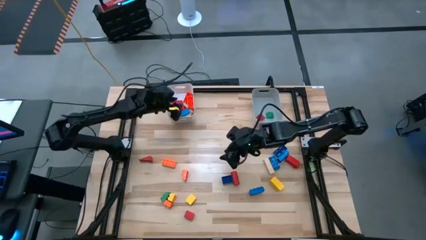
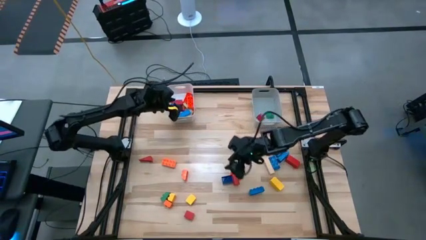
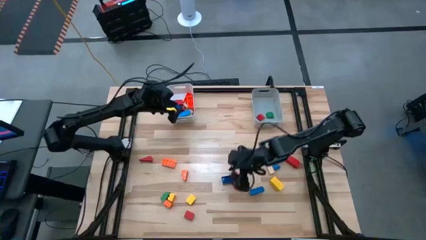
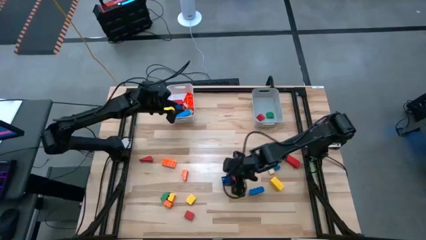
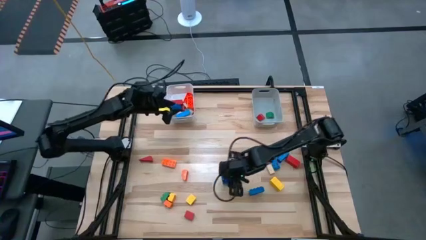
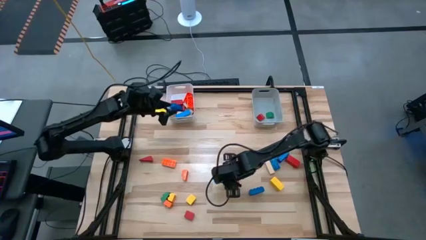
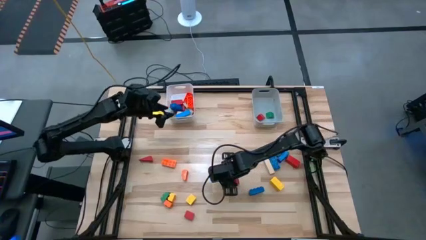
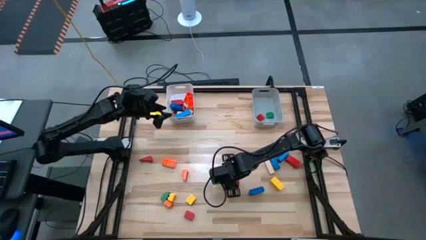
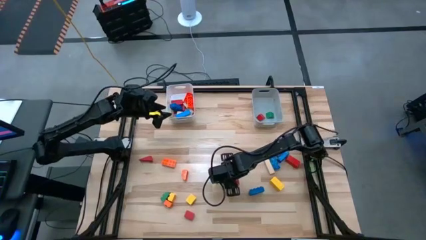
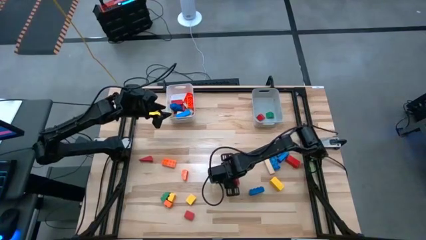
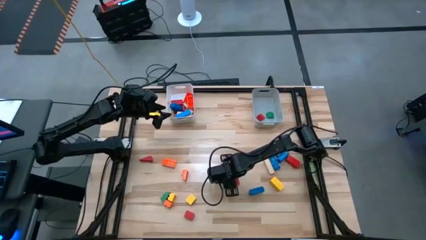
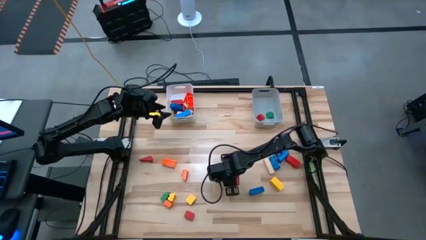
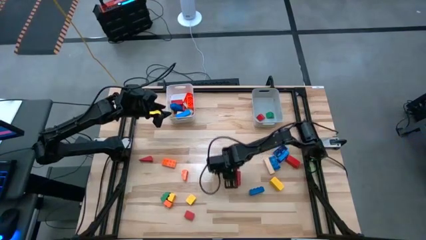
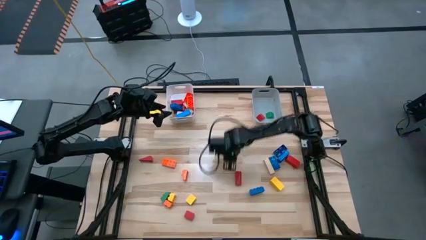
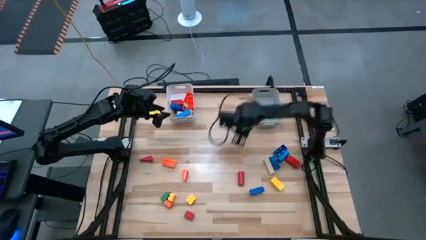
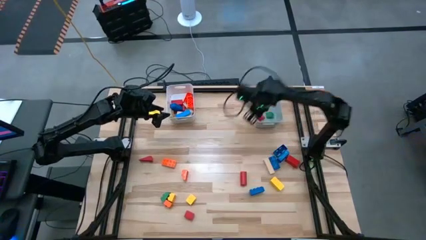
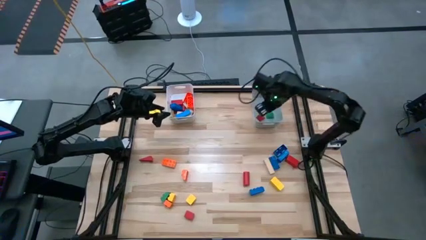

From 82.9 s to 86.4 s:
Task: Sort blocks by size
Put the blue cuboid wooden block into the gray bin

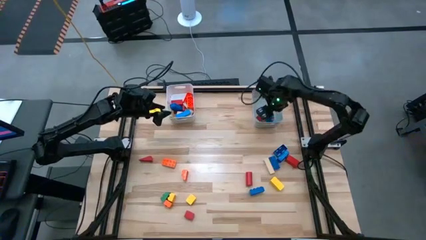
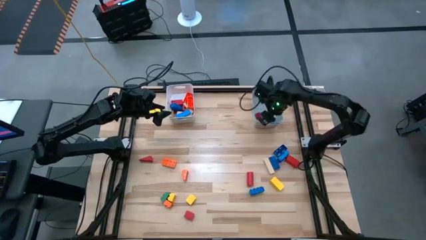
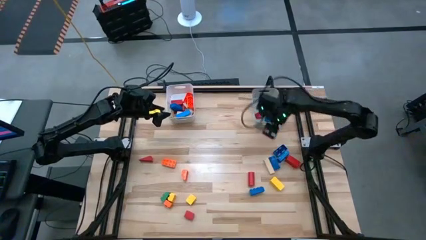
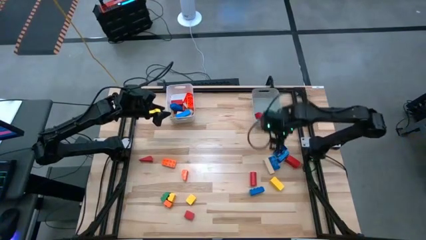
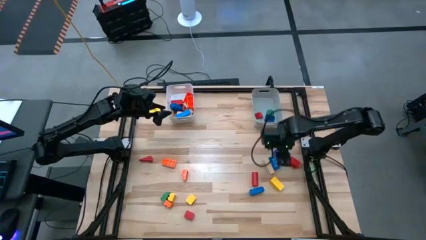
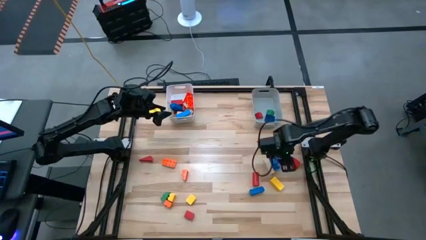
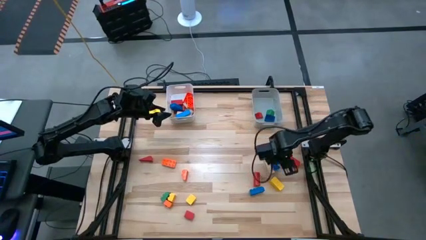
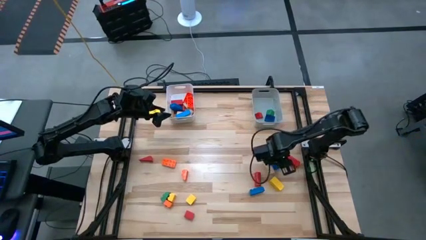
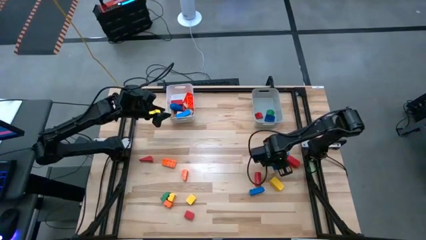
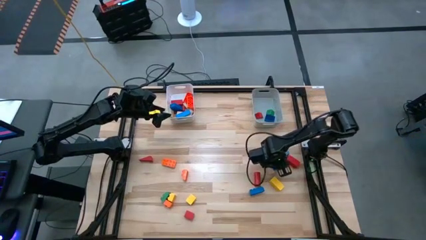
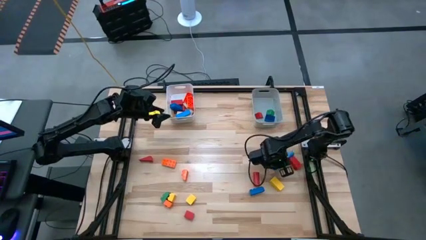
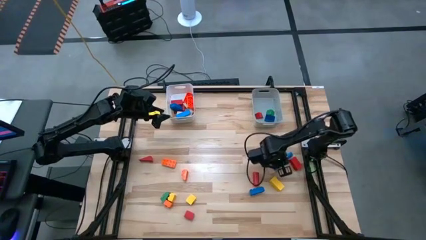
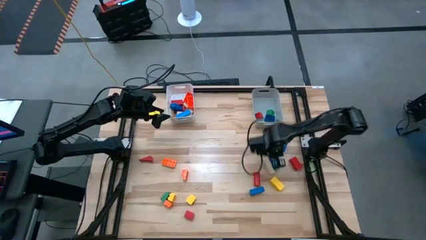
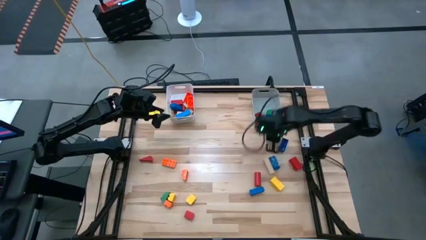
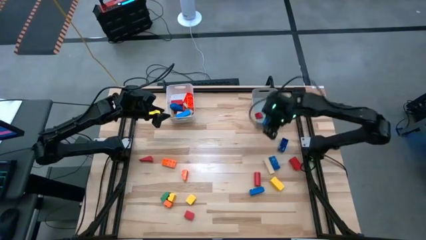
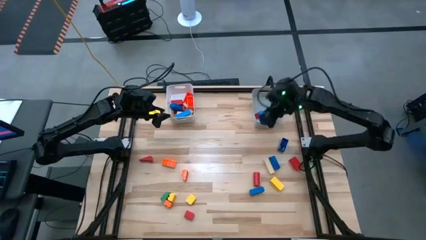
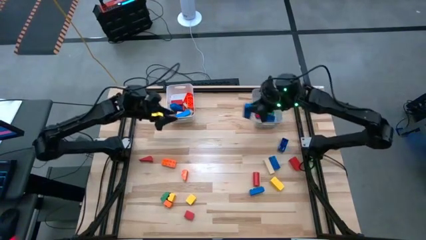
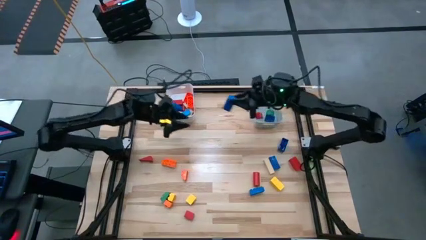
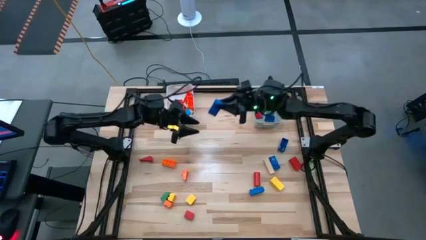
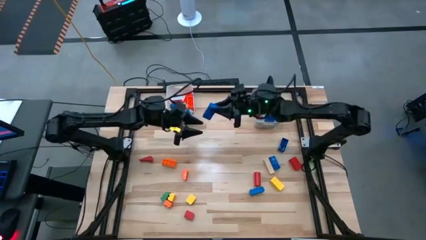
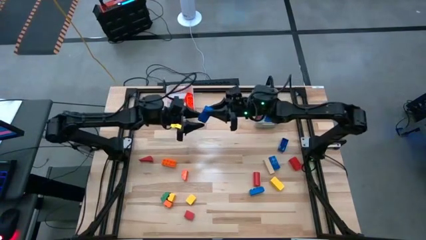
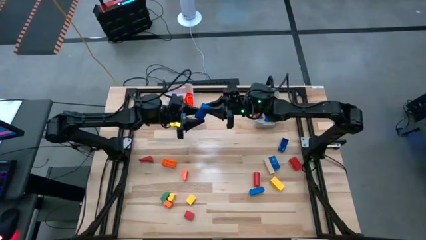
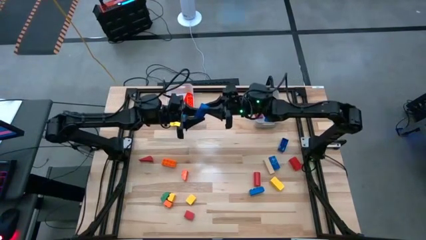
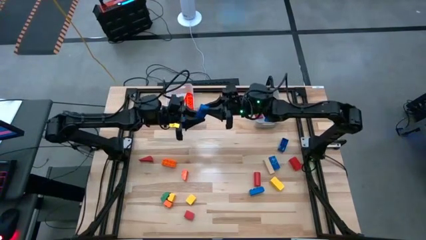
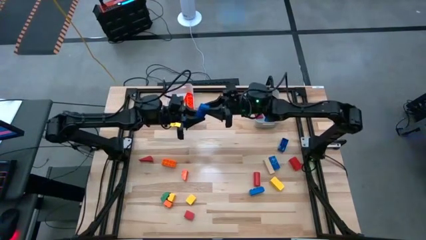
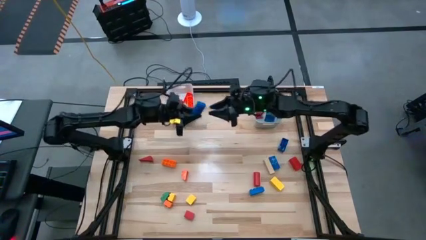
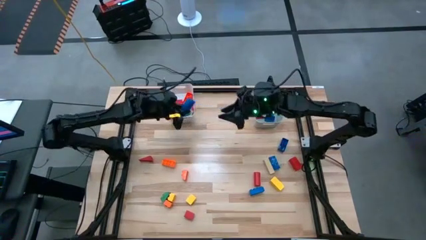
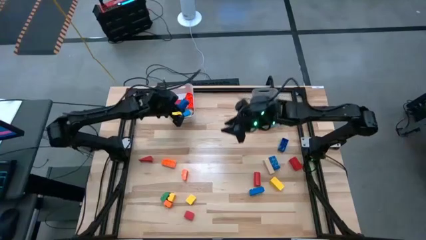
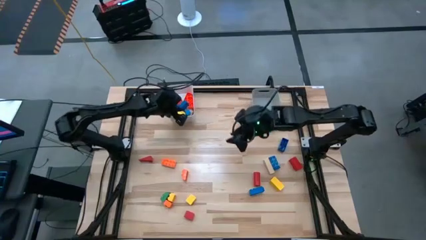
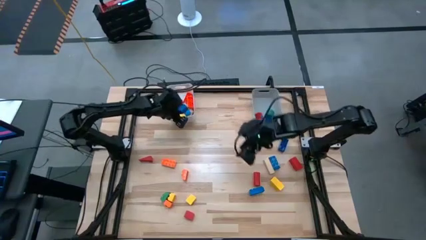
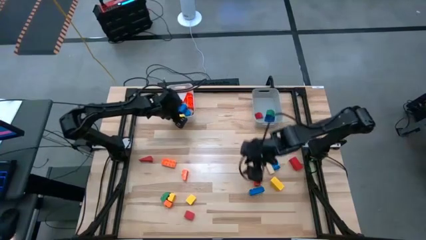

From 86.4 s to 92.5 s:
Put the blue rectangle game piece into the white bin

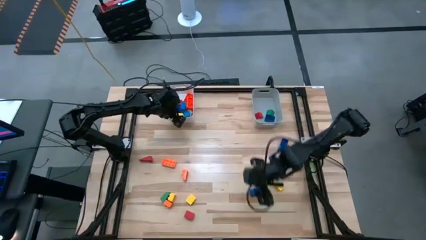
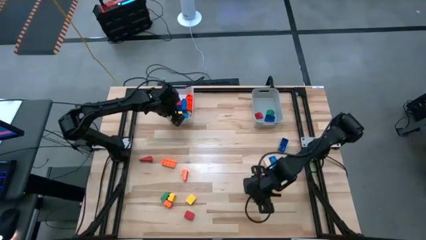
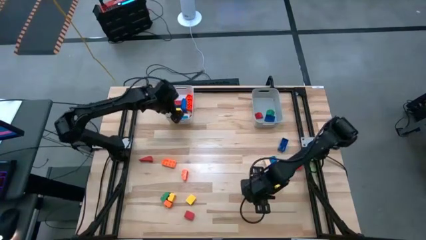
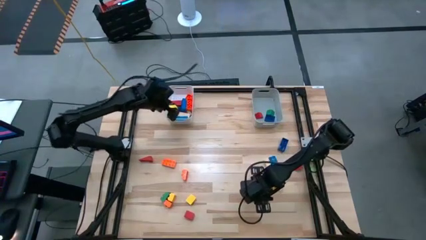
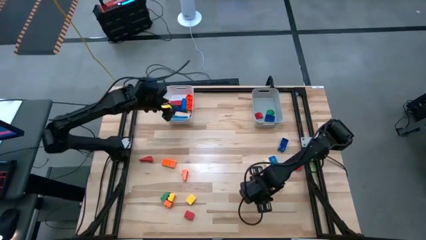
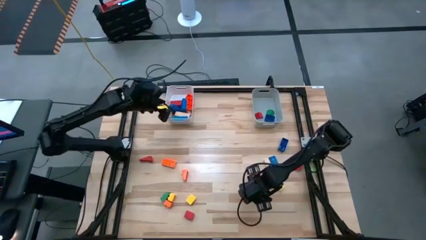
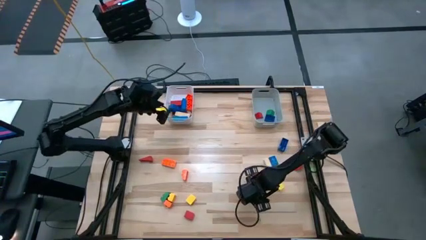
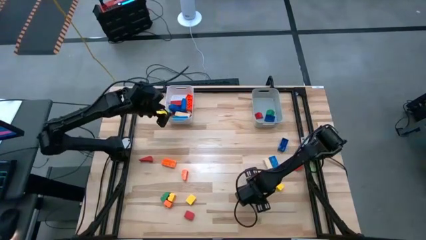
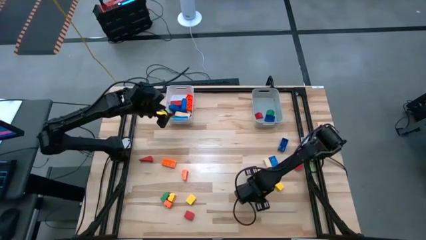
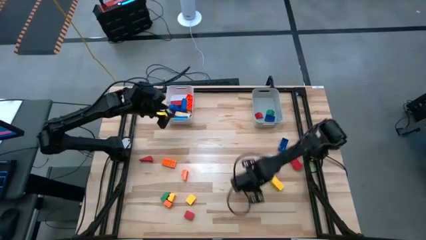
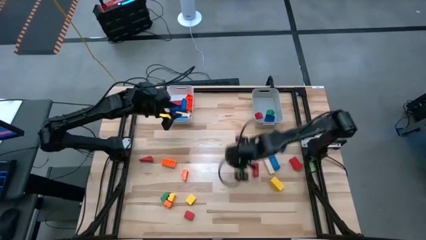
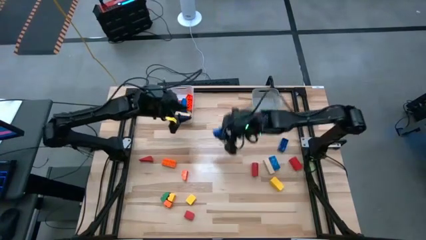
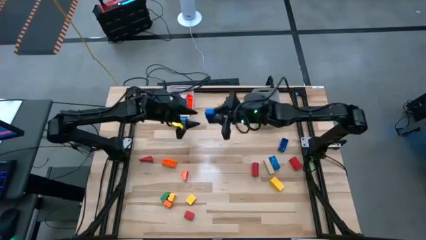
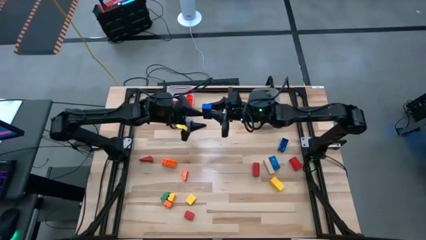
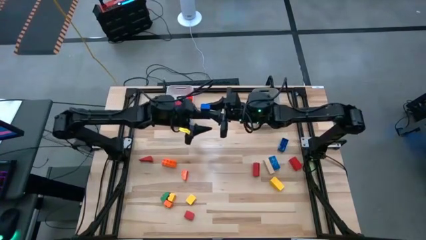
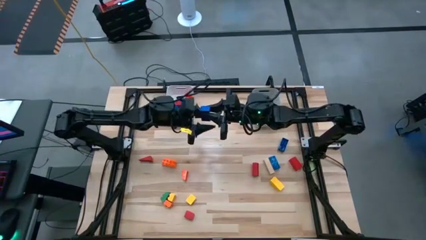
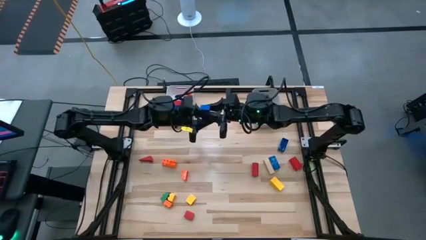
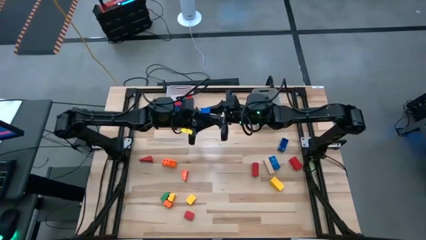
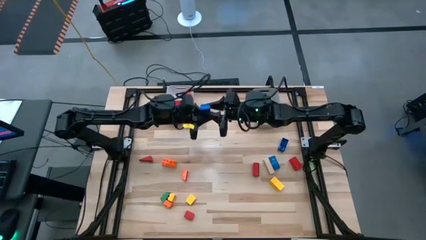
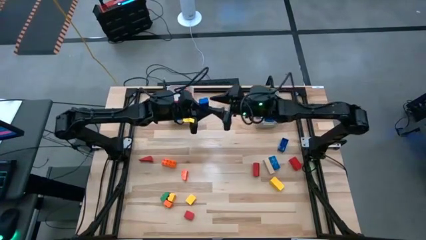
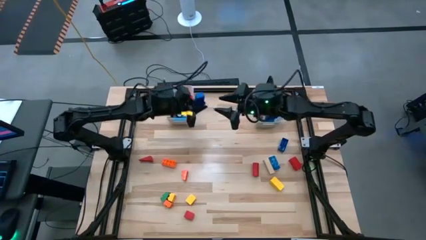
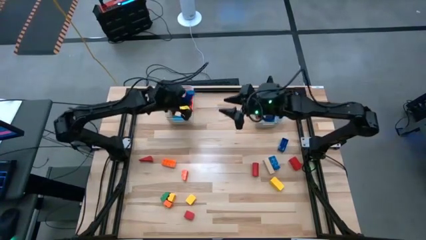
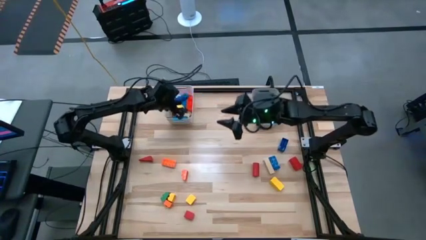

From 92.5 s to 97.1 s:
Put the blue rectangle game piece into the white bin

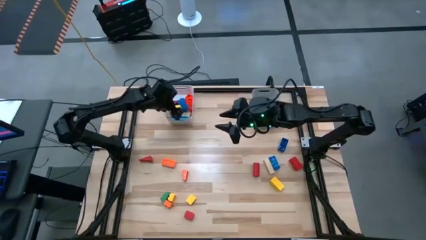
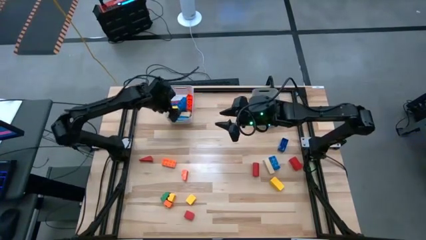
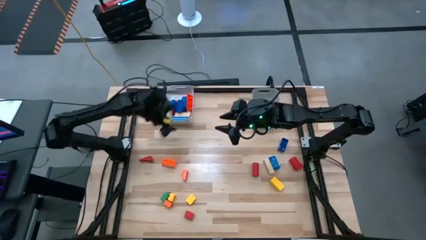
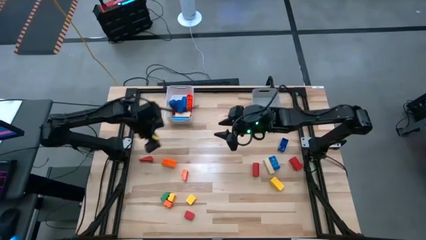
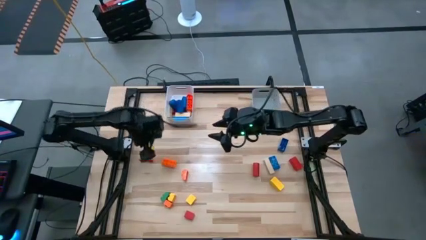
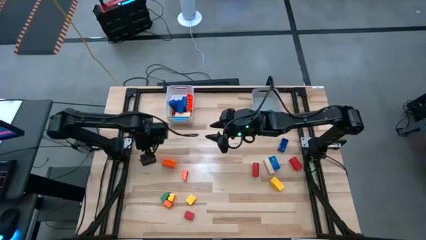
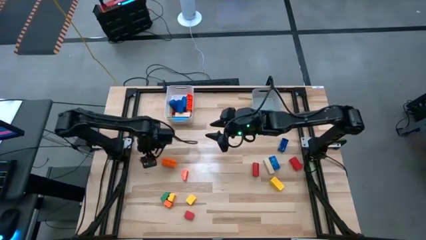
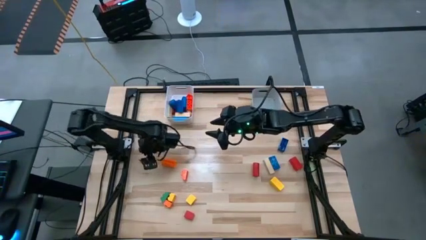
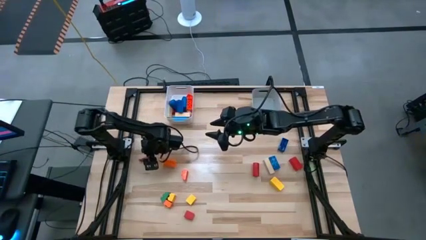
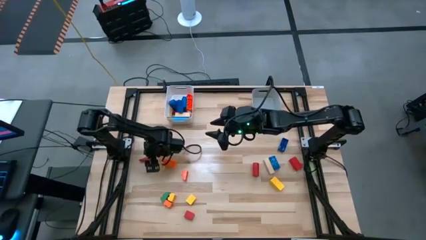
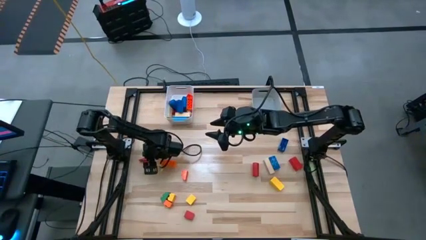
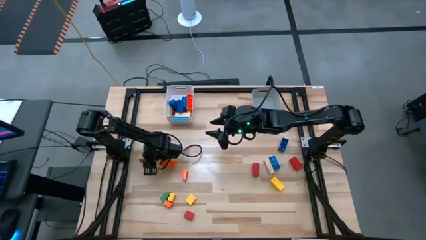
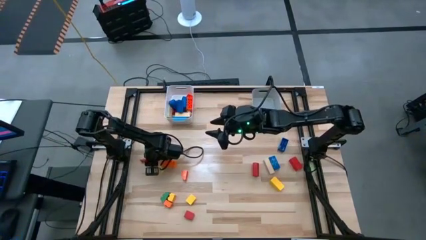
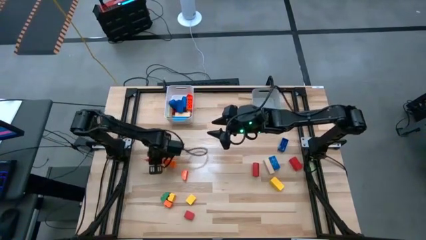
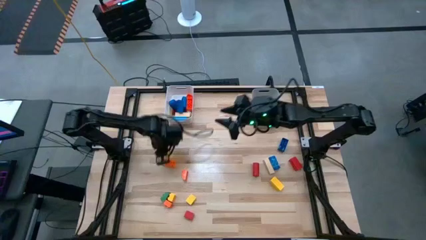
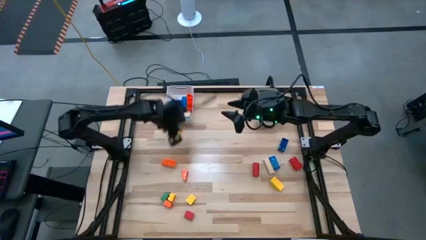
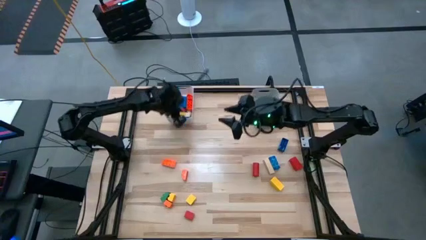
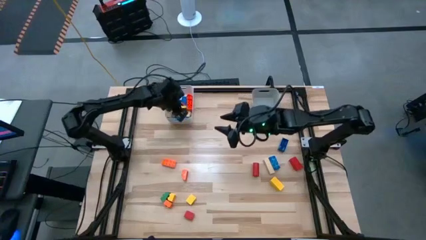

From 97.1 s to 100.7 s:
Put the red triangle wooden block into the white bin
